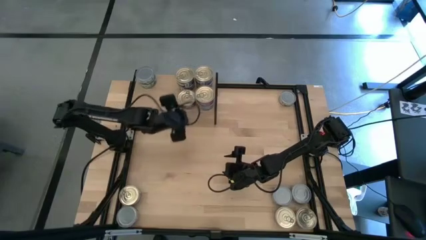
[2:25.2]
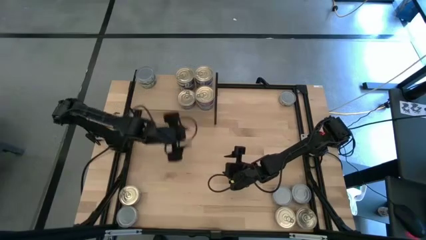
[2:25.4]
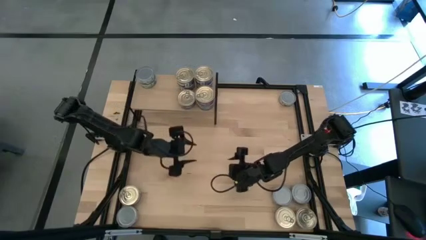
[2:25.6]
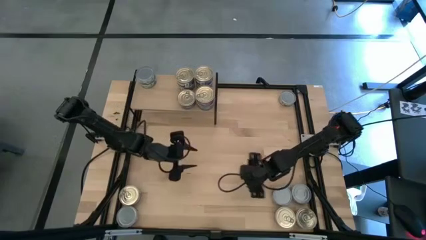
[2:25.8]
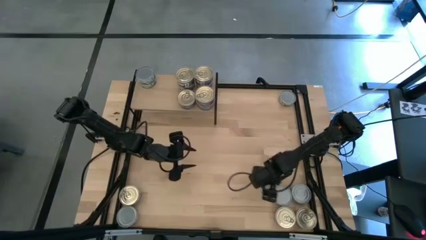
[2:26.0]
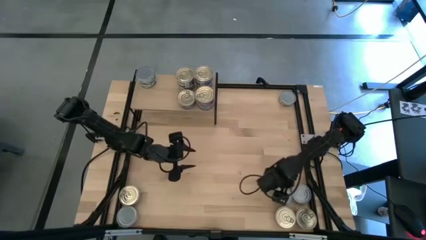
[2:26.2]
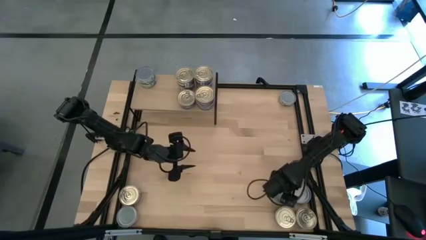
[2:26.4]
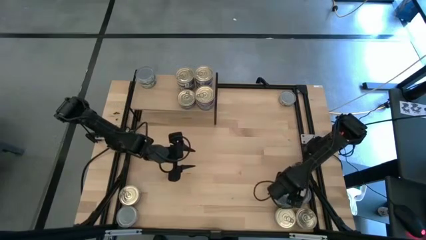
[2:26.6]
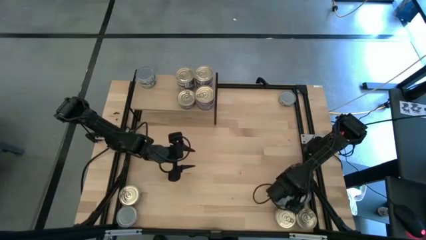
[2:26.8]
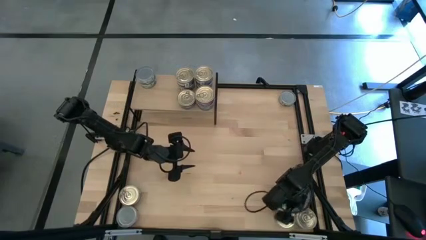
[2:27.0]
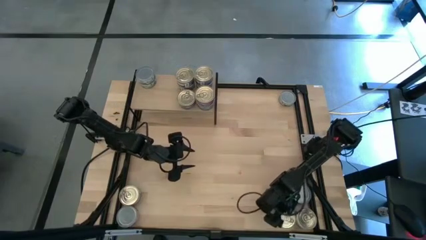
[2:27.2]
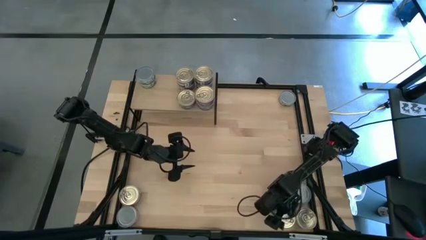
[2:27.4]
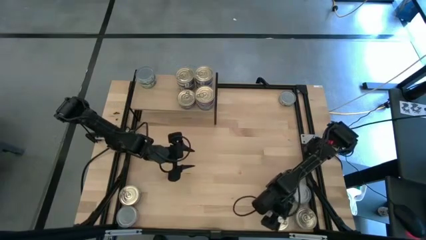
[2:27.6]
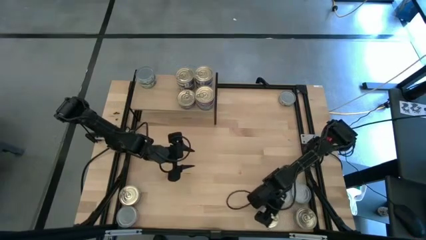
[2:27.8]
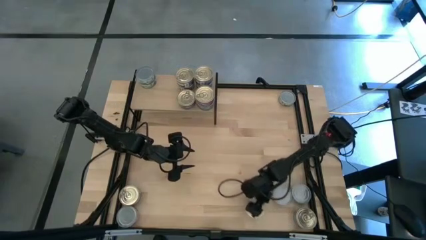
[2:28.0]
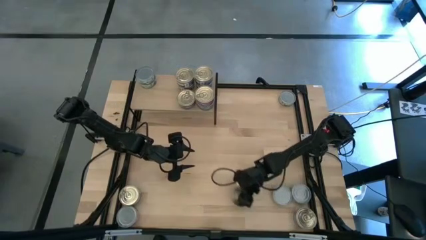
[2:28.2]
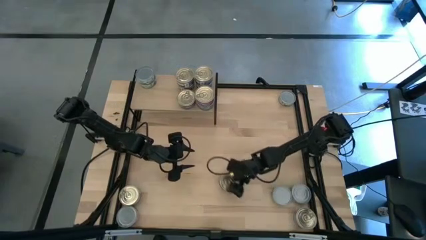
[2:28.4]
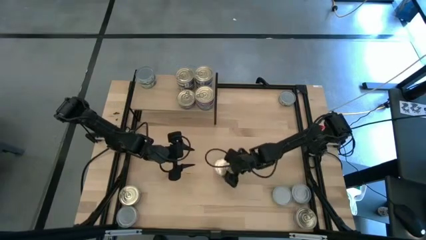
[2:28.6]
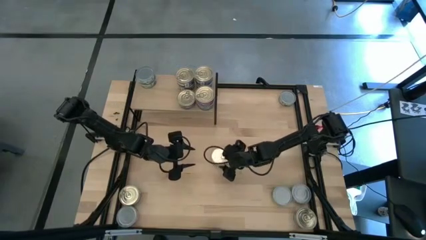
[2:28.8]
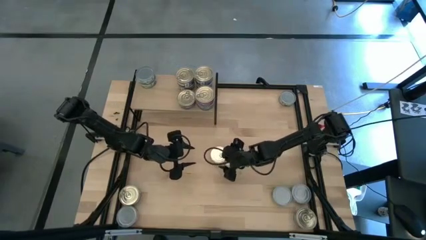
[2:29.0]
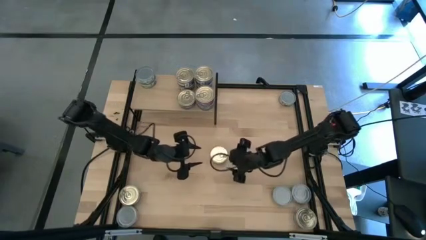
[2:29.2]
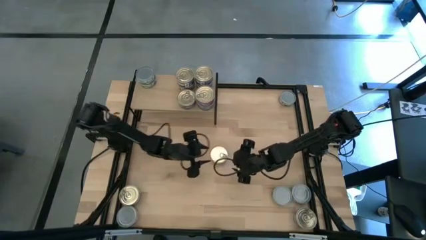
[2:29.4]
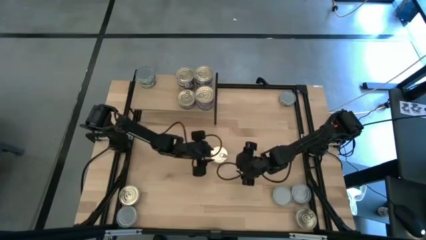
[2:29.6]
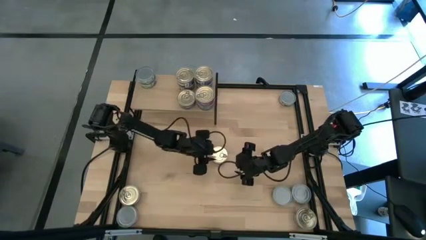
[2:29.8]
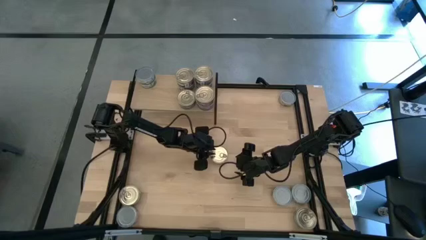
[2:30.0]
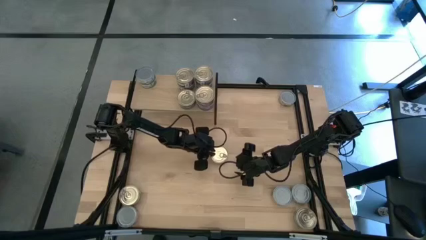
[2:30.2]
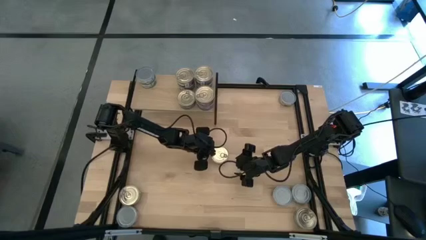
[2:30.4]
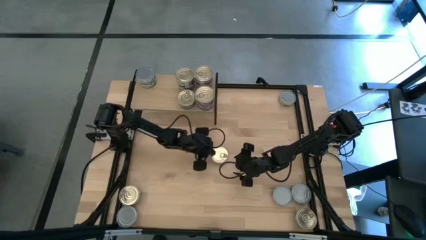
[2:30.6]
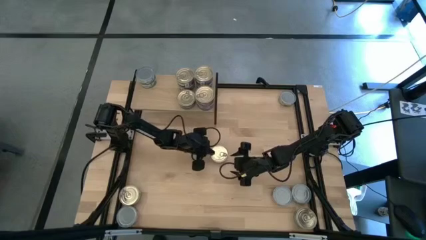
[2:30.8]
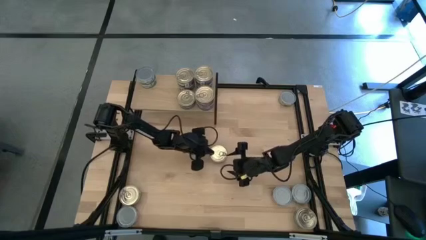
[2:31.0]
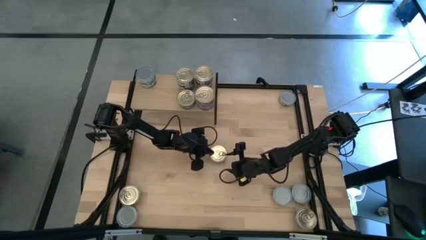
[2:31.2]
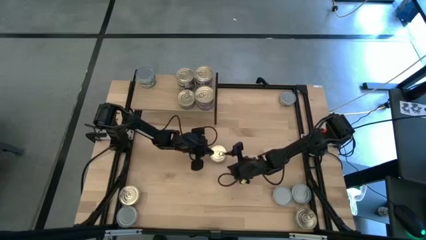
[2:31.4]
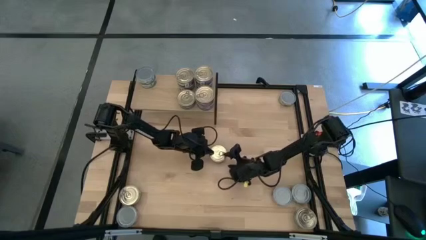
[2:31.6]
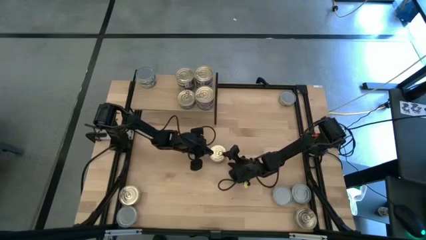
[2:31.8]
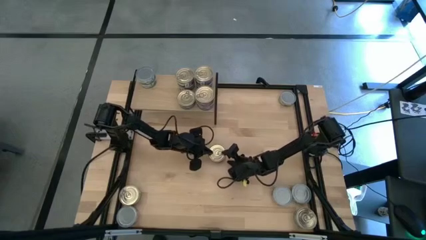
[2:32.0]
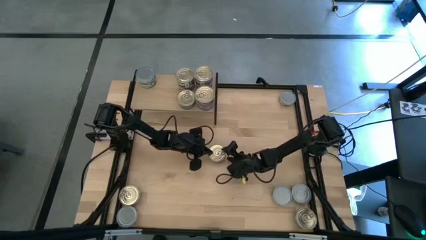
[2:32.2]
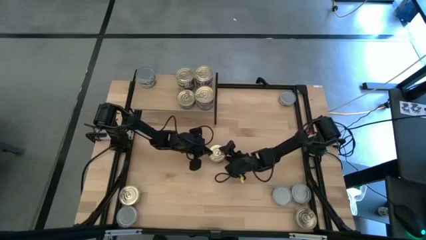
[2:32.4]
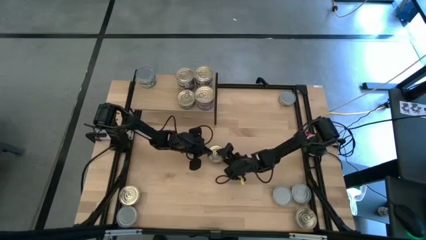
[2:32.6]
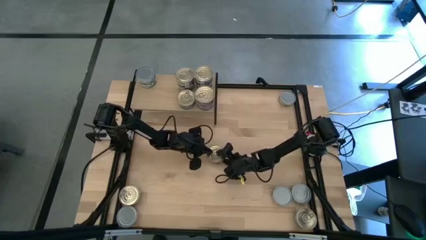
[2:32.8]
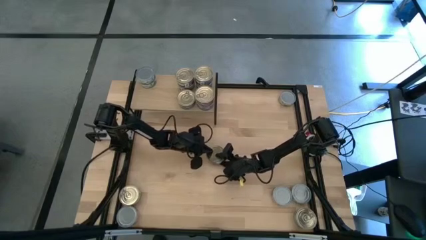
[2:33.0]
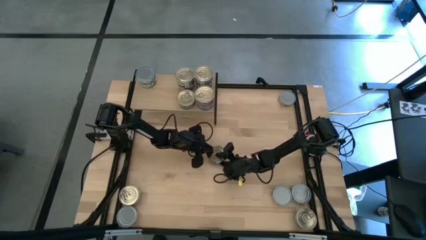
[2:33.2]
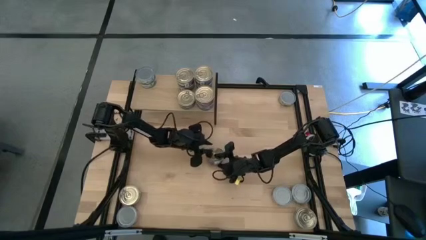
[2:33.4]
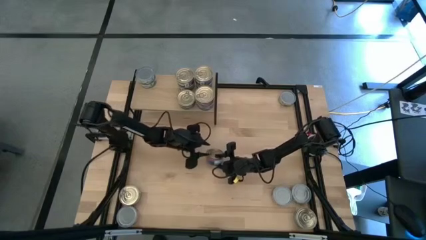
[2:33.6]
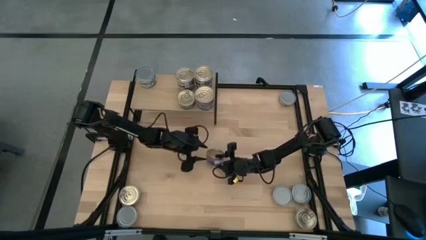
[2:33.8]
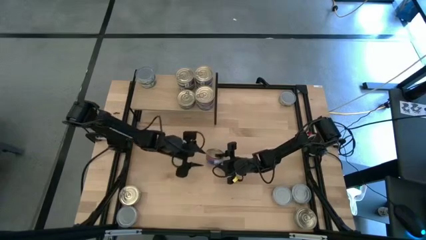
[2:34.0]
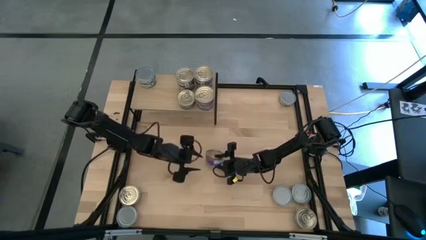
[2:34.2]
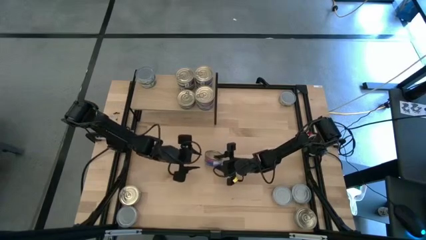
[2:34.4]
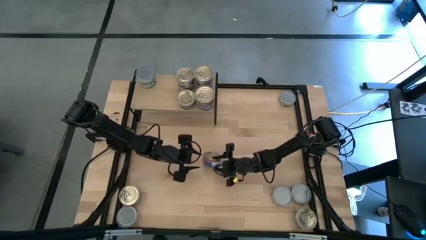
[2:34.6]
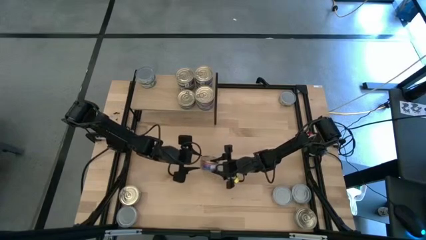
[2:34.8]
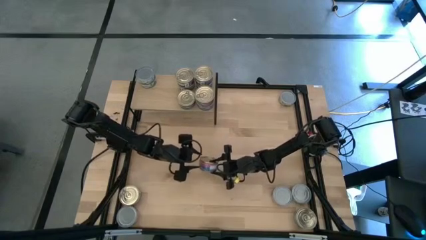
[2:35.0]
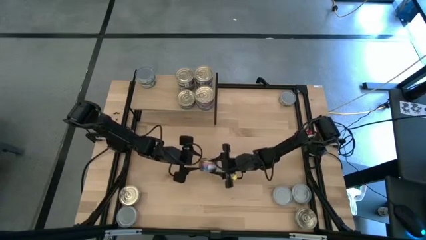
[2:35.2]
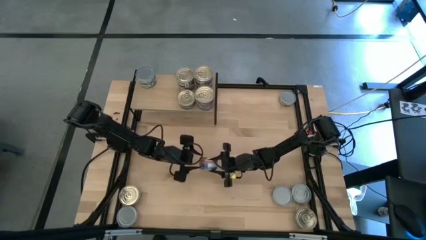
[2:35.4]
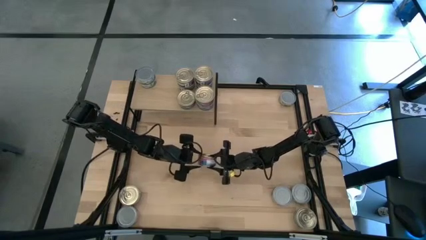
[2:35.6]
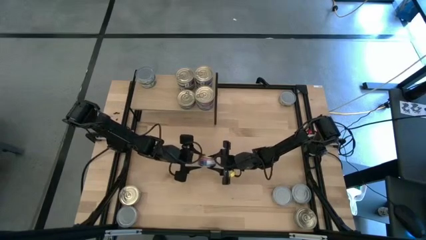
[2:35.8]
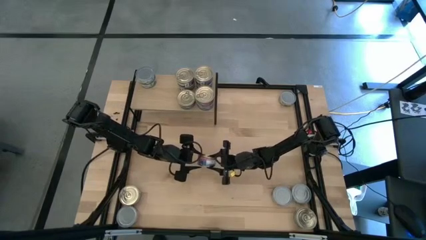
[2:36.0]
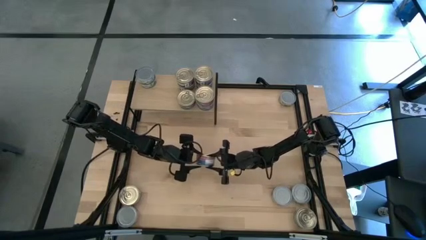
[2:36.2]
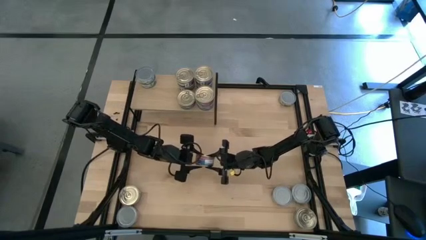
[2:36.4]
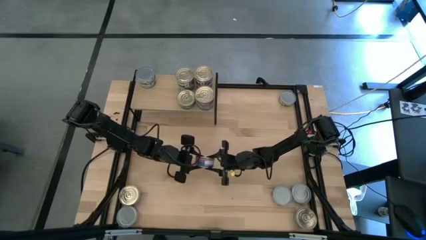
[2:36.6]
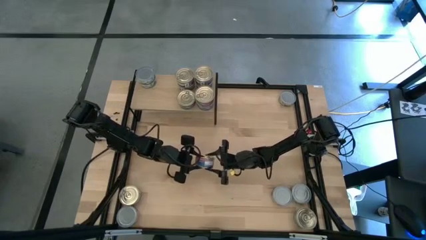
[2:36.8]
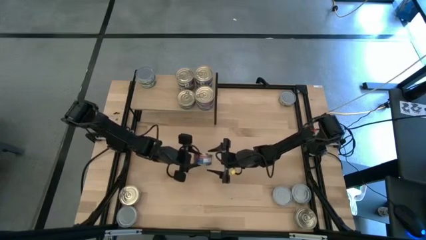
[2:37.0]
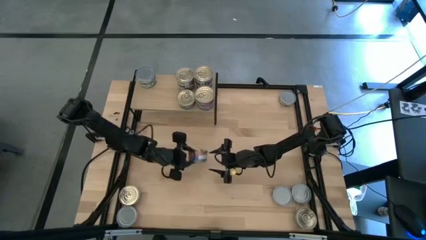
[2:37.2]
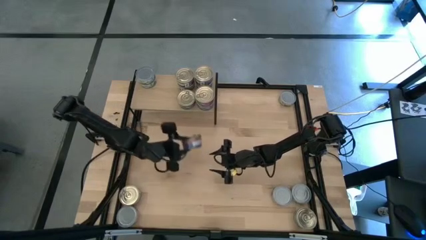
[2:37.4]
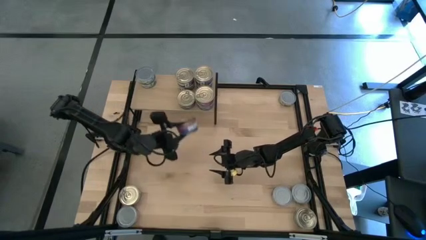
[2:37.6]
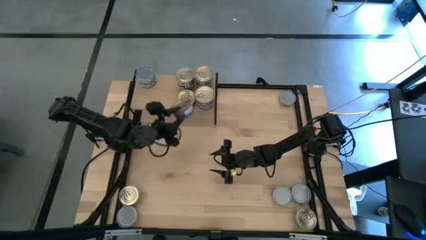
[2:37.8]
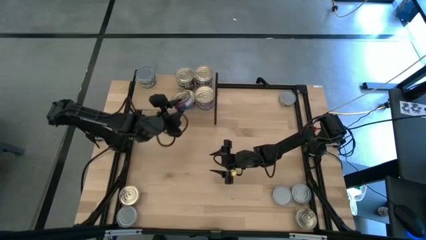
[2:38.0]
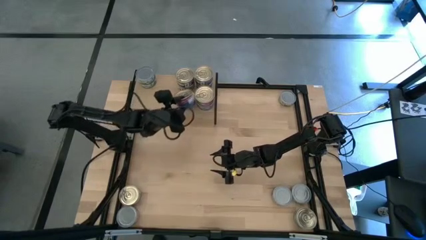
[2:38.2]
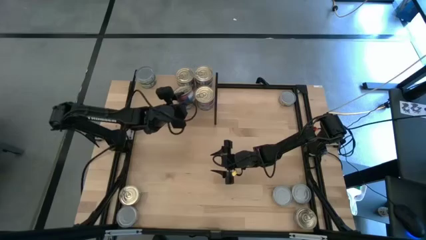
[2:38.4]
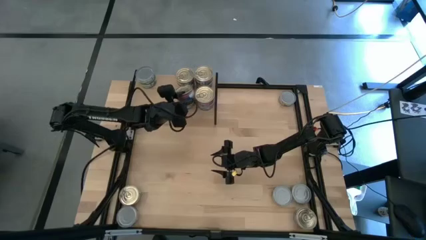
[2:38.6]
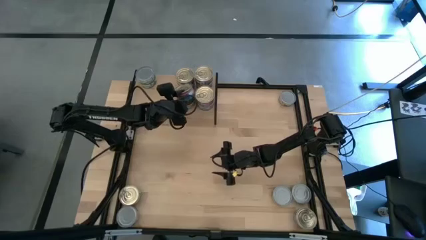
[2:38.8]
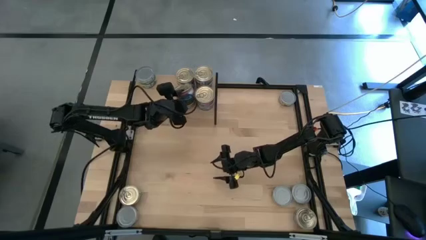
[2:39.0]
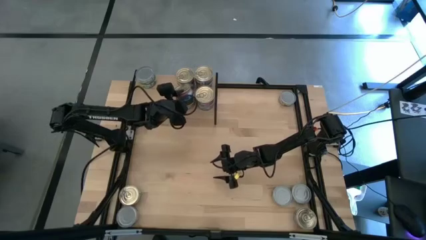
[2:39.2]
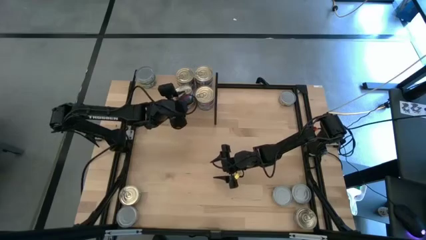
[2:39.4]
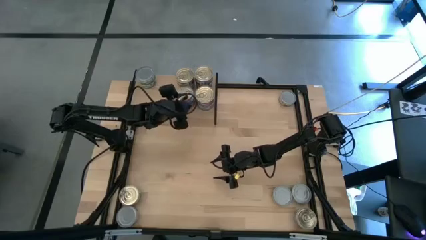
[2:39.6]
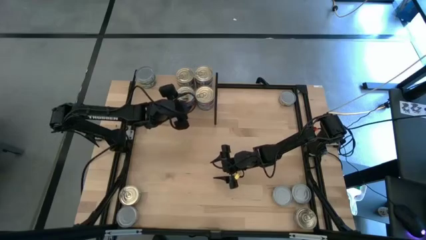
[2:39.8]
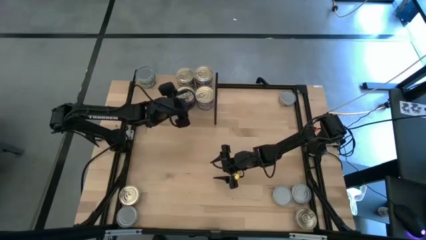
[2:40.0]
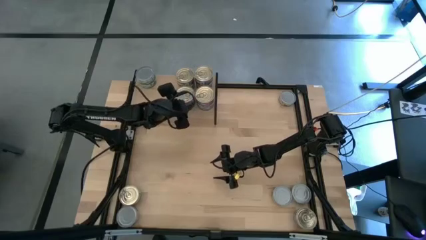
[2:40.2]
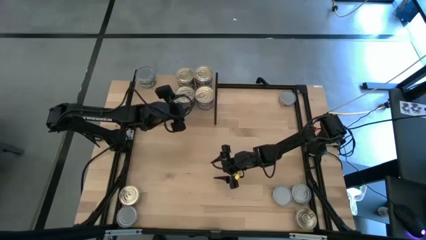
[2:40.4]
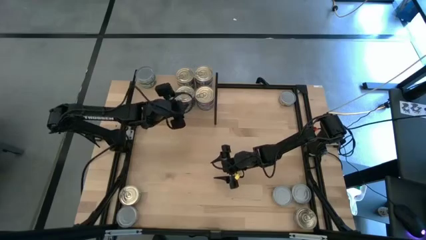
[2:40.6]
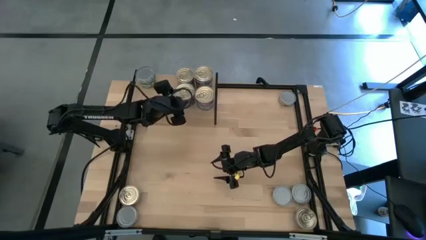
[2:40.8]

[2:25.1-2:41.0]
Task: Stack canned seafood by type on shelf
Stack the blue tuna can on top of the blue tuna can on the shelf
